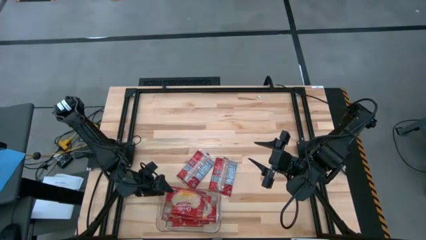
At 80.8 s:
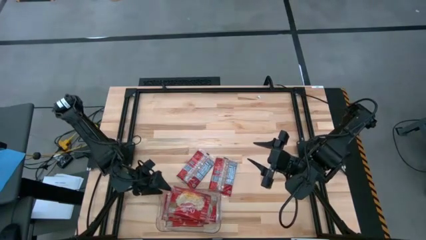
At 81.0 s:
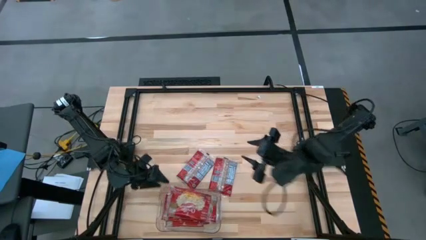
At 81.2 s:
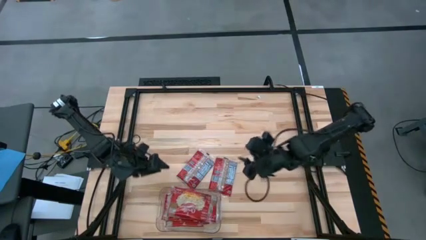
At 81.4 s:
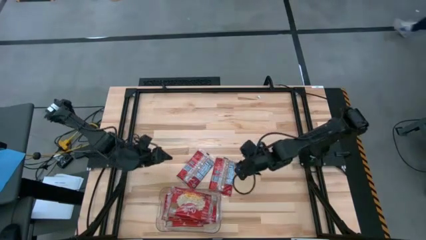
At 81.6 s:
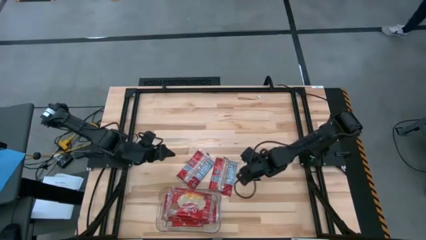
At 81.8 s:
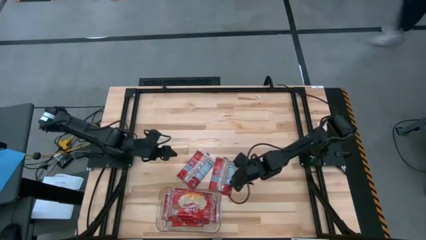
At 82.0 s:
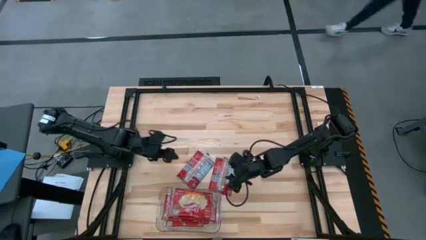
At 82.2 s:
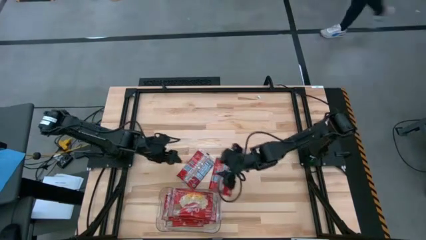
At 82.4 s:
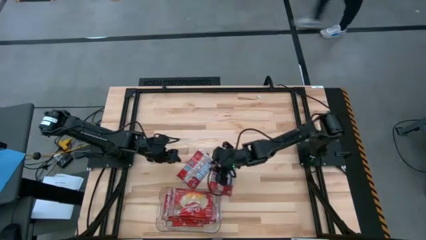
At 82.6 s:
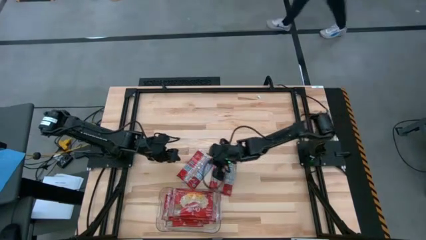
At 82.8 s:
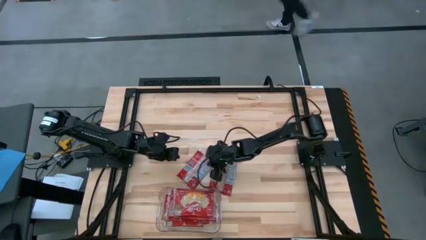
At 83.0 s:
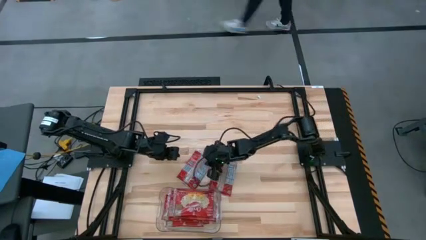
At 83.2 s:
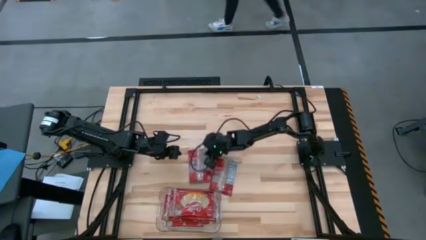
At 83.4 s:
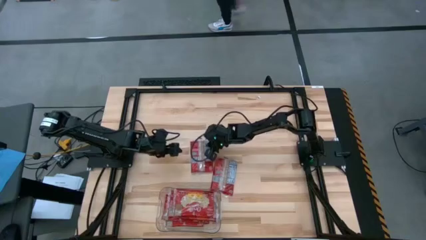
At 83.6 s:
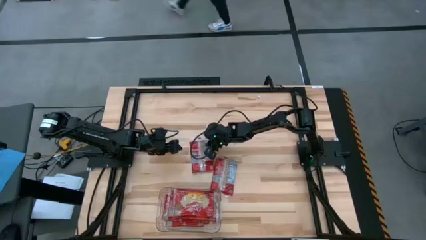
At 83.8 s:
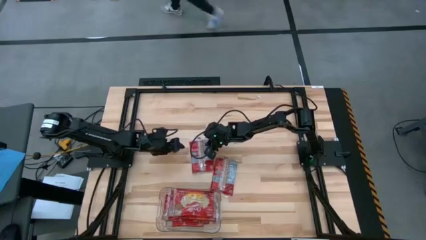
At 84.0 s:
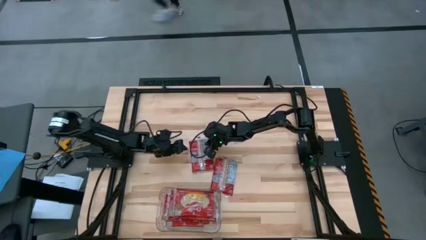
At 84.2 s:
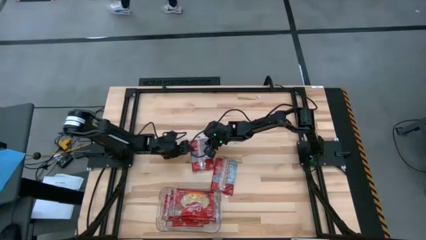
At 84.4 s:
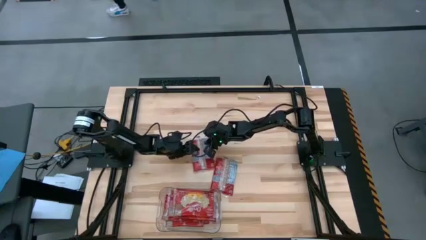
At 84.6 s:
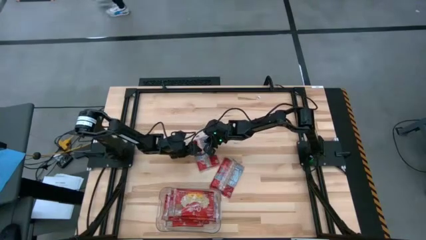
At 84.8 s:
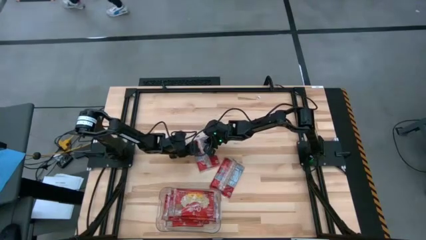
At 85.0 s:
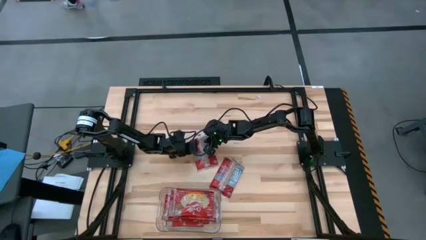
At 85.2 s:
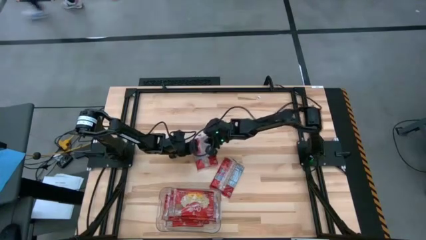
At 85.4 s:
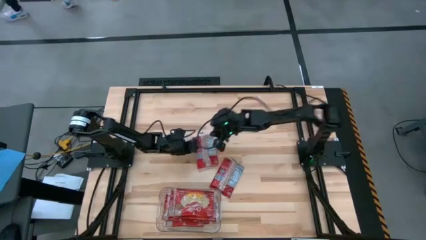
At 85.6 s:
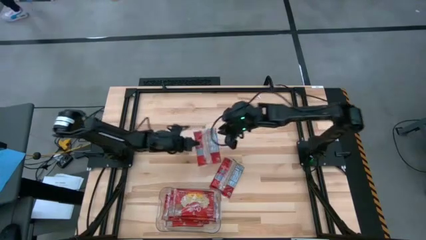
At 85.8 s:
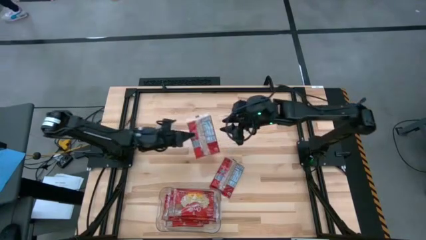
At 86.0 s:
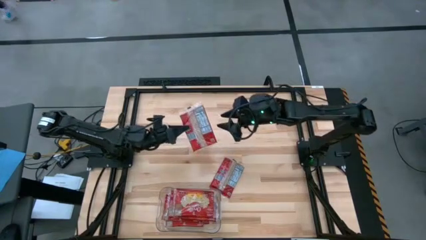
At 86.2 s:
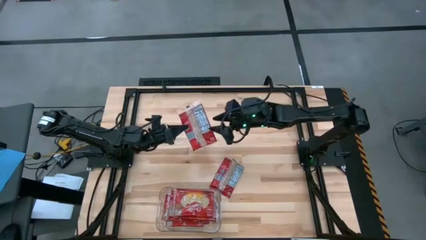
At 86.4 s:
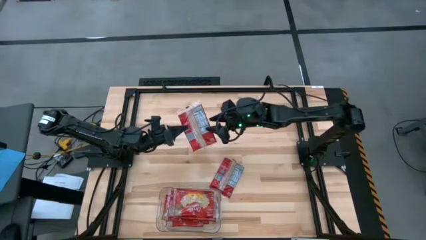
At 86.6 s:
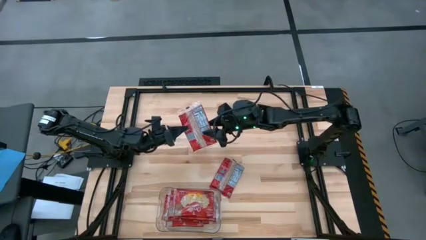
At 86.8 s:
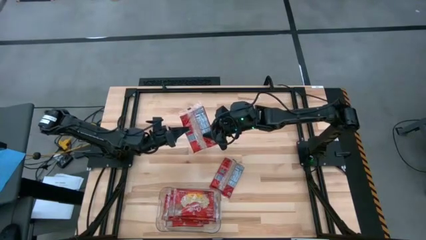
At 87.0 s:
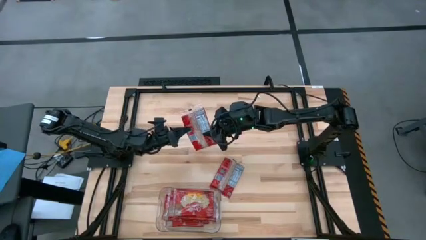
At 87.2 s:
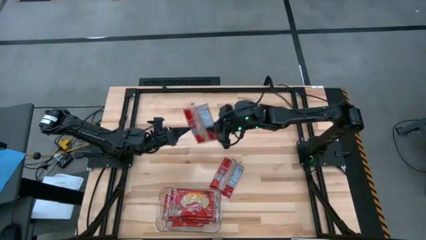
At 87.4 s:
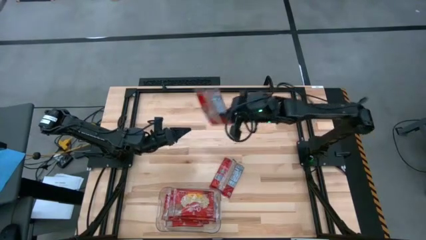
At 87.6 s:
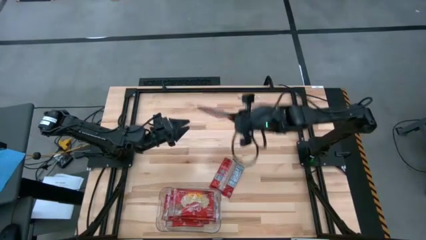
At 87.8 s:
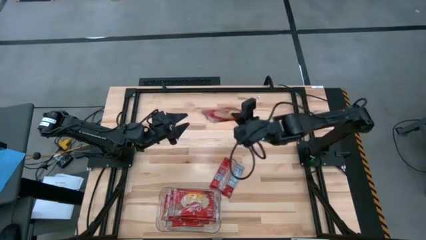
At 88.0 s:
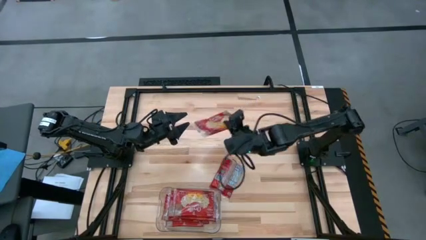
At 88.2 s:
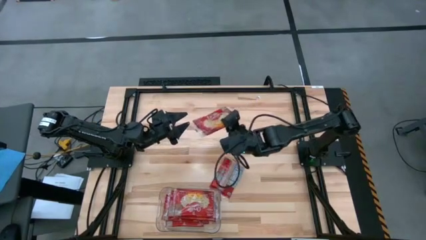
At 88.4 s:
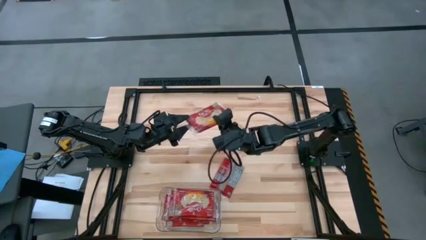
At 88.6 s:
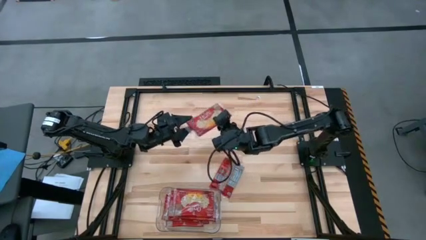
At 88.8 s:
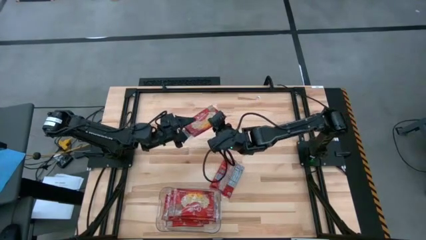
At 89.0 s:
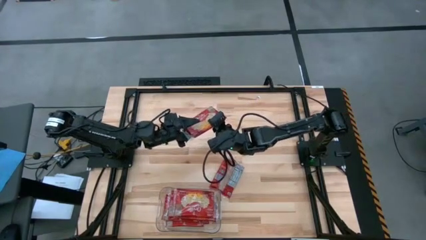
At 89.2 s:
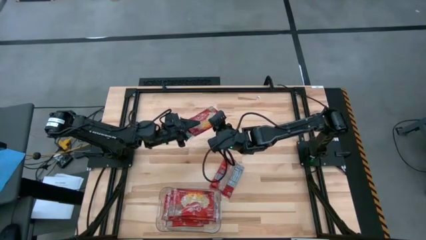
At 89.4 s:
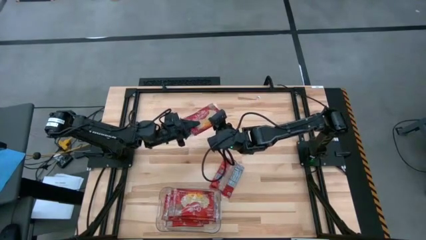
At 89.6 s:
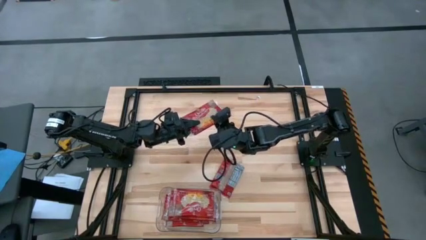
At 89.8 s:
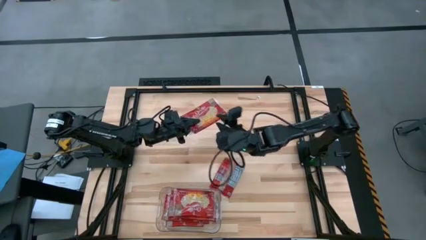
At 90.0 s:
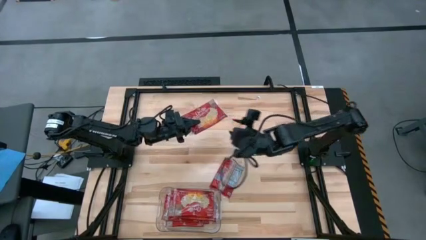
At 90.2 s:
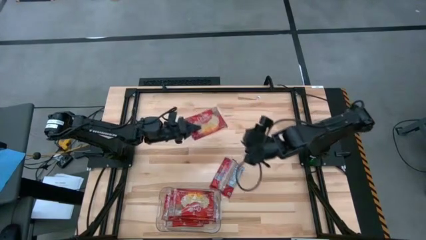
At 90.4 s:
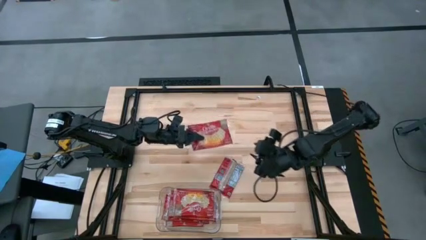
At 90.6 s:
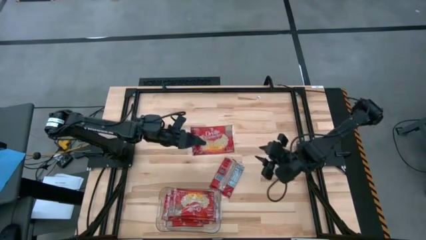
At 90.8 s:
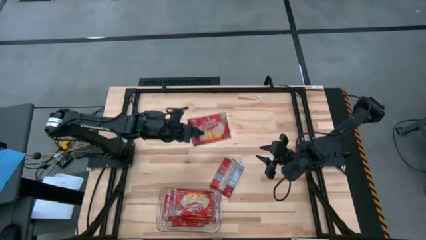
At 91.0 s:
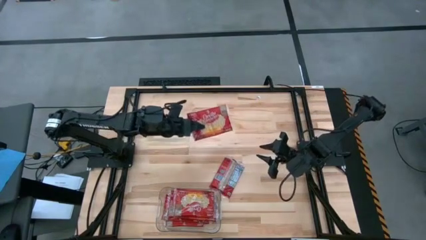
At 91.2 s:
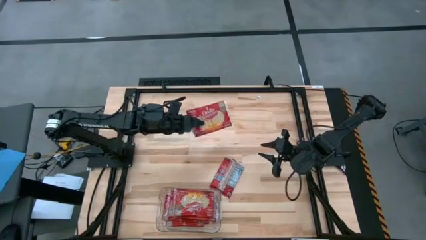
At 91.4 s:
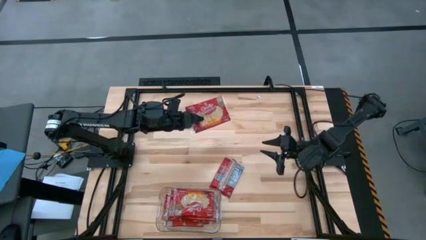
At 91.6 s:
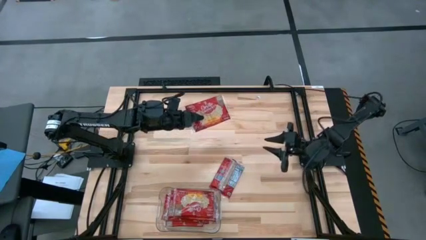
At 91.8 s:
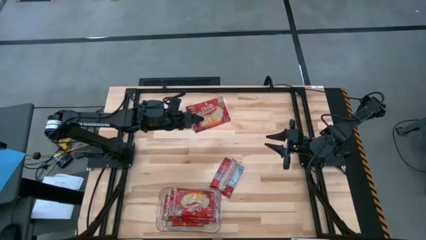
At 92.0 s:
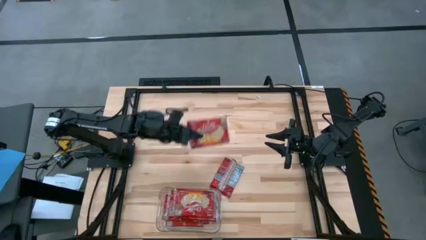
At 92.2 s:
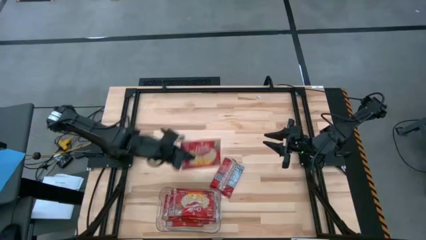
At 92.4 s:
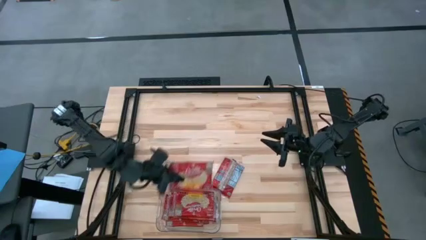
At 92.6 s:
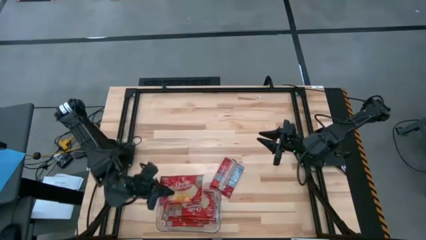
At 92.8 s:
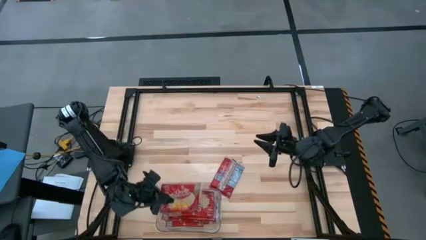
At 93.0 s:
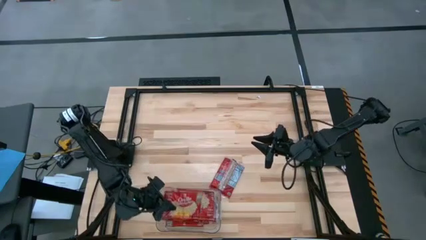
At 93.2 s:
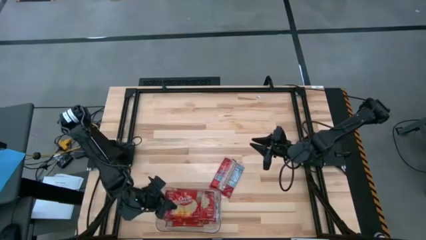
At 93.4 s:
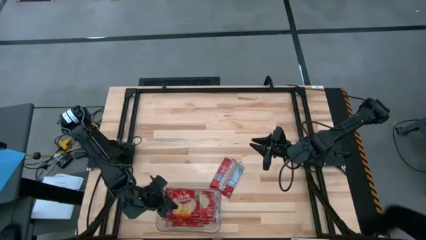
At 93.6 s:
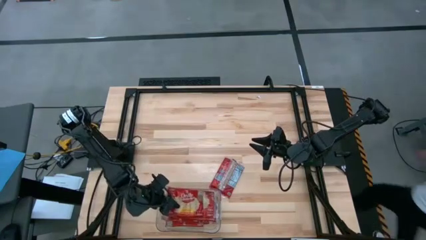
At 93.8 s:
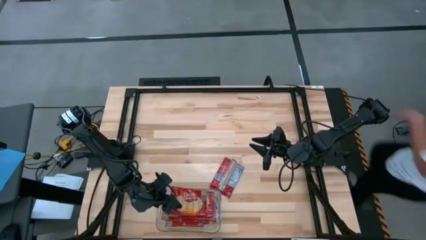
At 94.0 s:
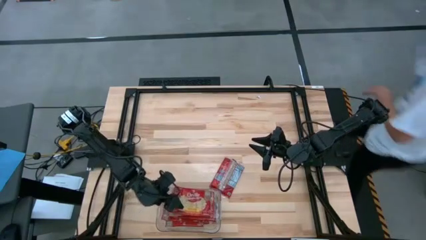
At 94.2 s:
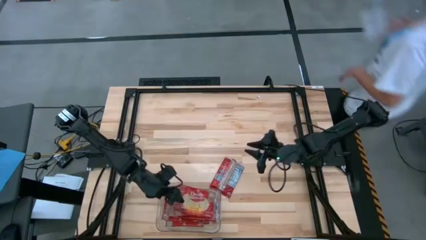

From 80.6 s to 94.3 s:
Task: Sort popcorn bags into baskets
Put the red popcorn bag into the transparent bin
